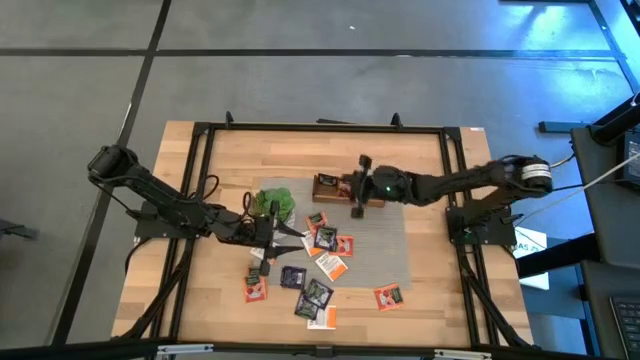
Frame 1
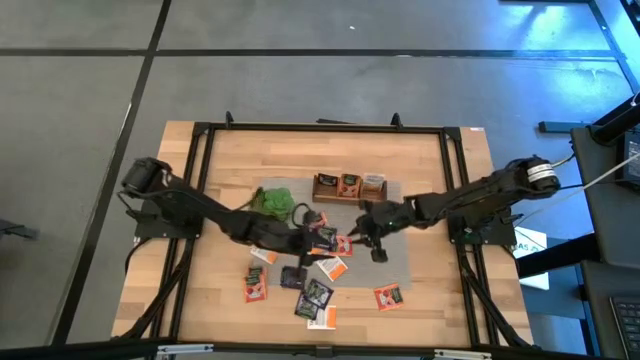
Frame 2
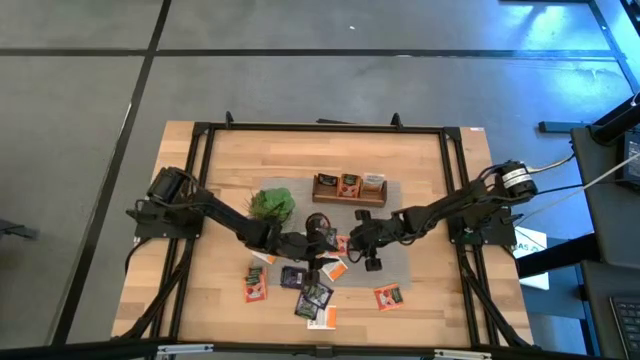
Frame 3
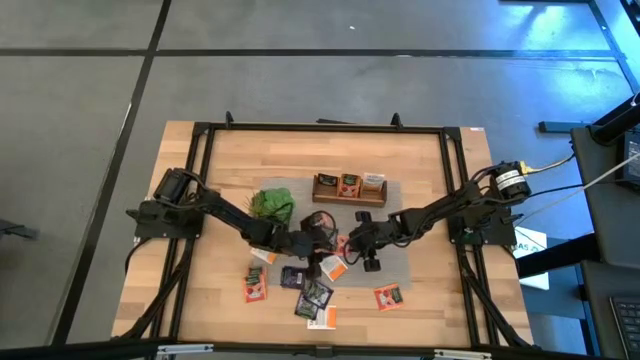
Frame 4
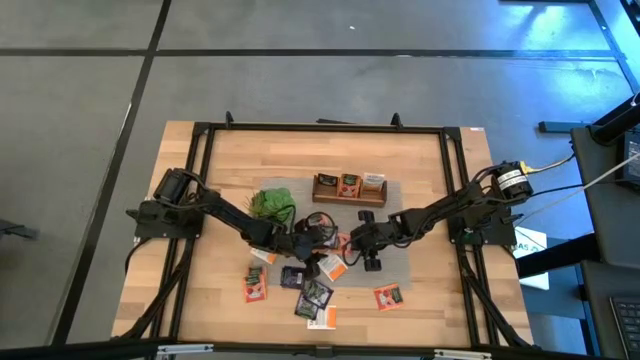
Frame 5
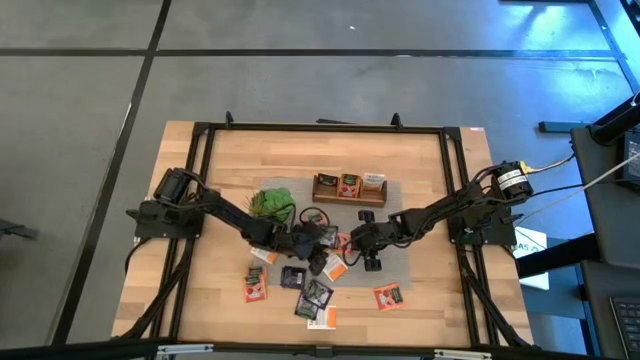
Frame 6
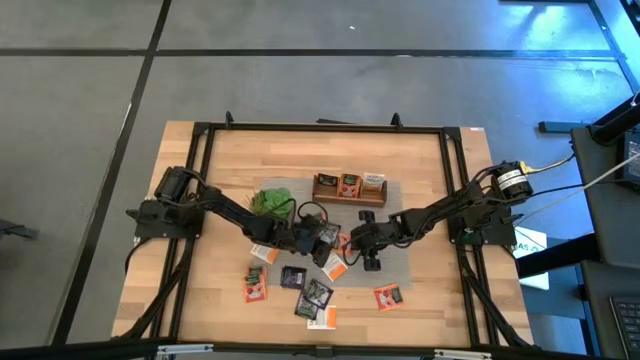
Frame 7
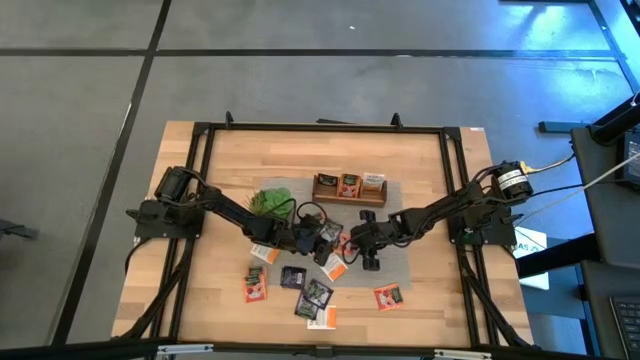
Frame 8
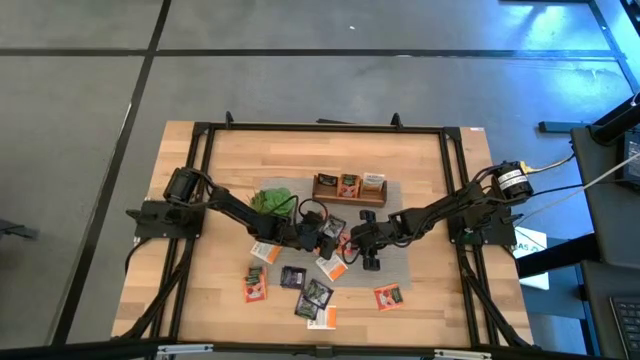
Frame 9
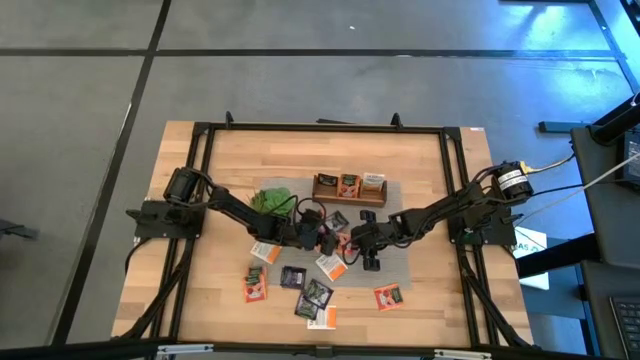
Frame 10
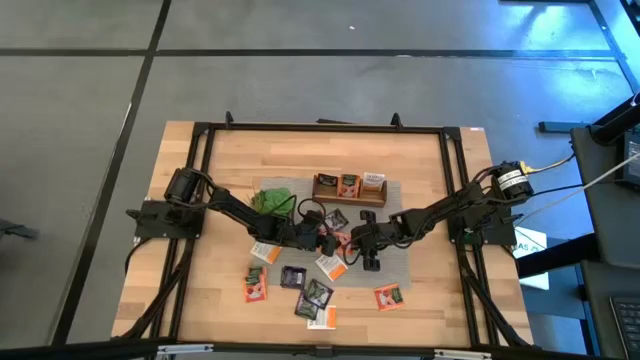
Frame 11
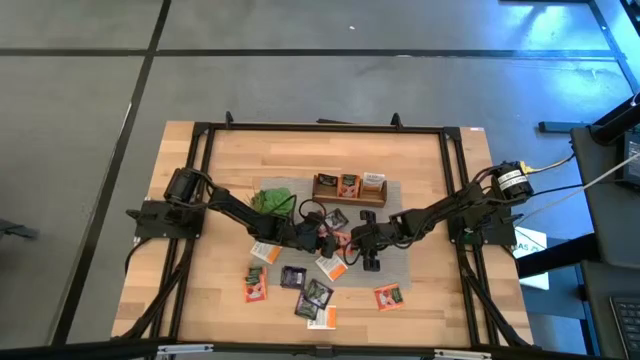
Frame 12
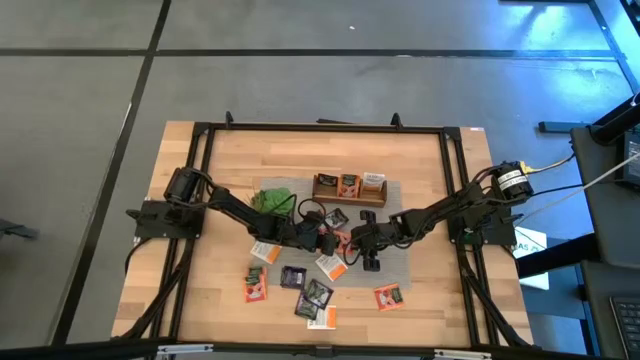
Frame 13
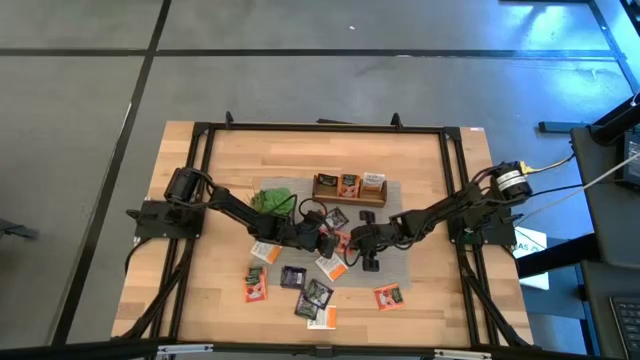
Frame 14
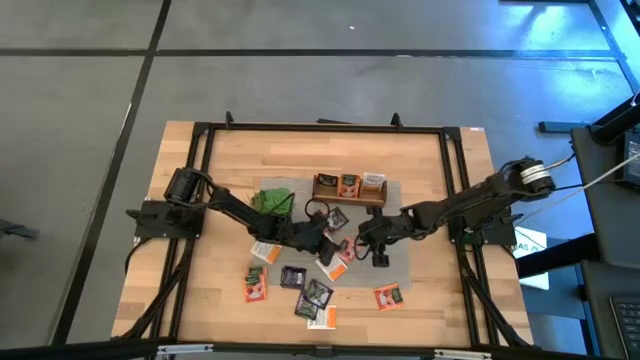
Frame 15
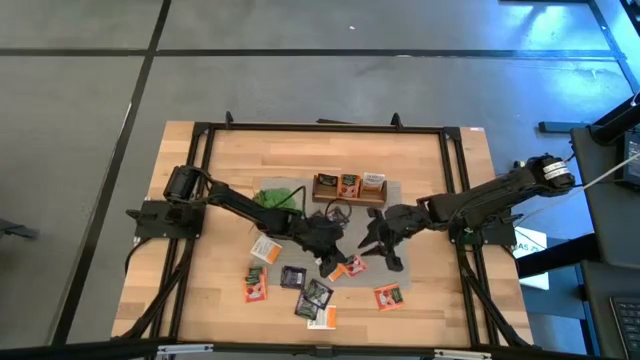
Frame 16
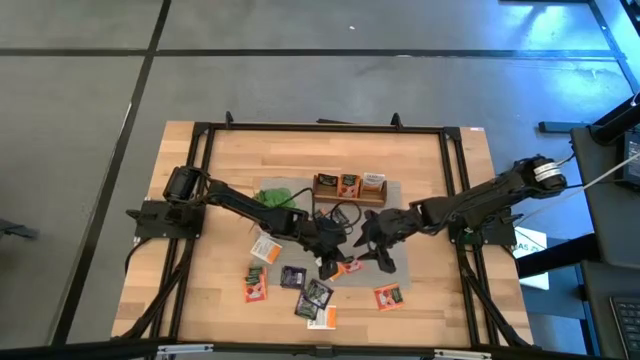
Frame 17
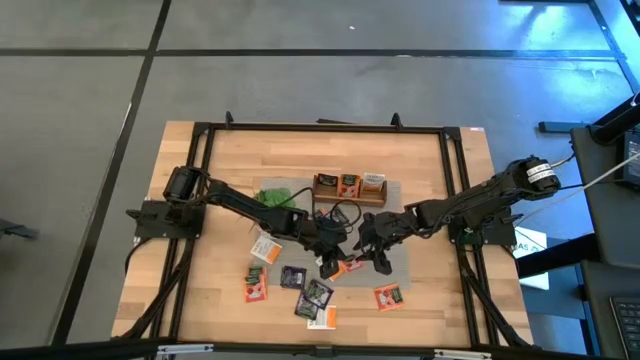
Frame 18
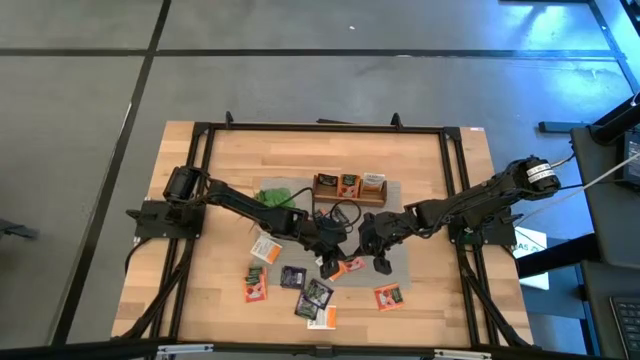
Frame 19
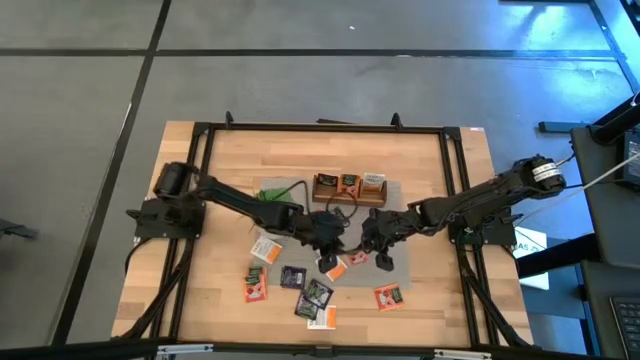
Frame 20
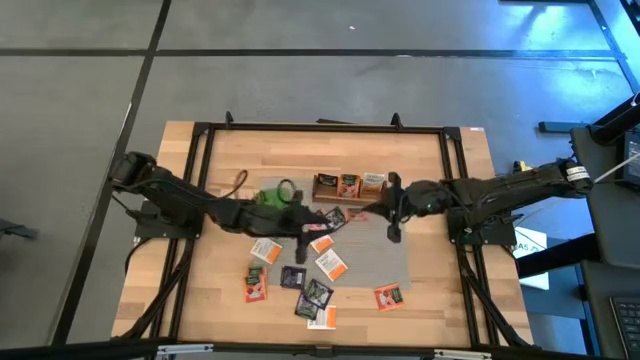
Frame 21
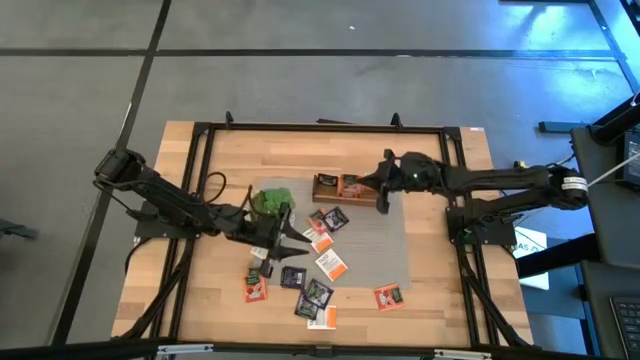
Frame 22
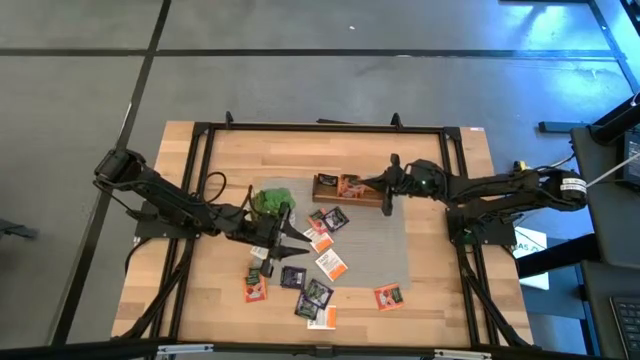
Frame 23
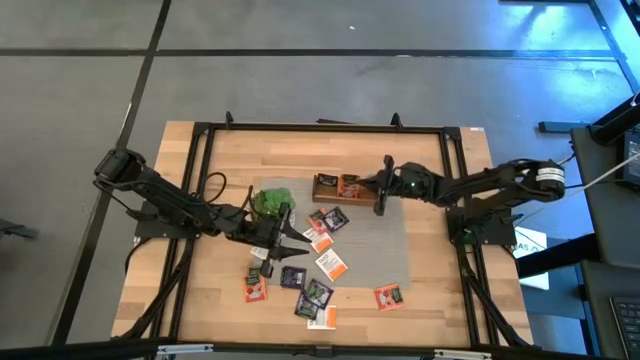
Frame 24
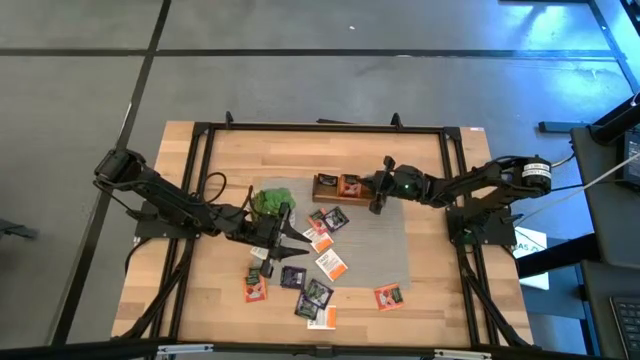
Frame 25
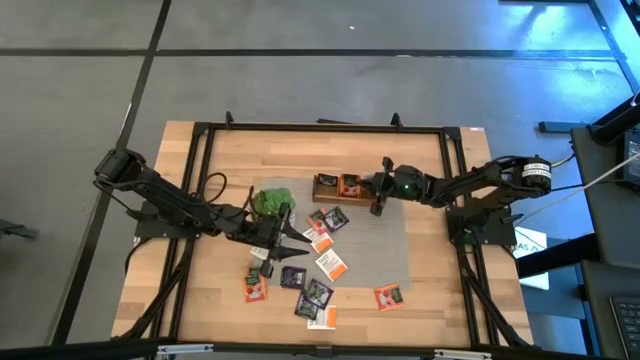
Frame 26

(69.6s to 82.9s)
Task: Pick & Place Tea
Put the orange tea bag into the middle section of the wooden organizer

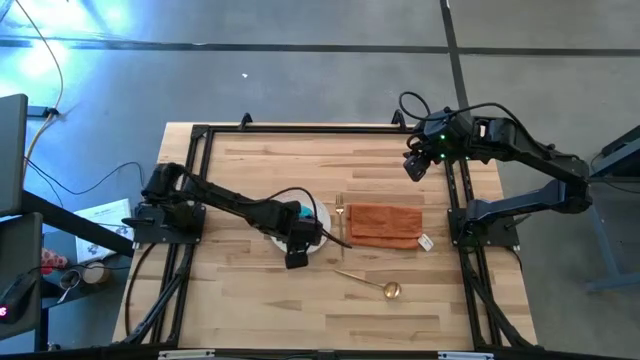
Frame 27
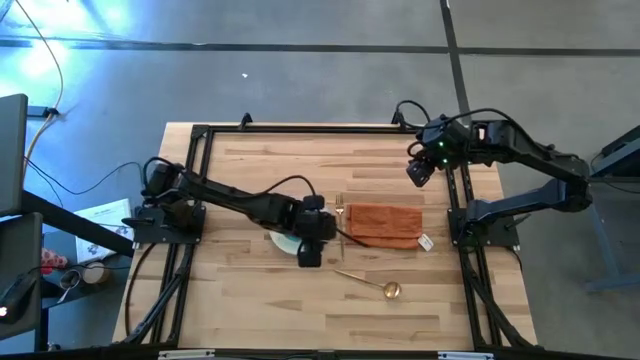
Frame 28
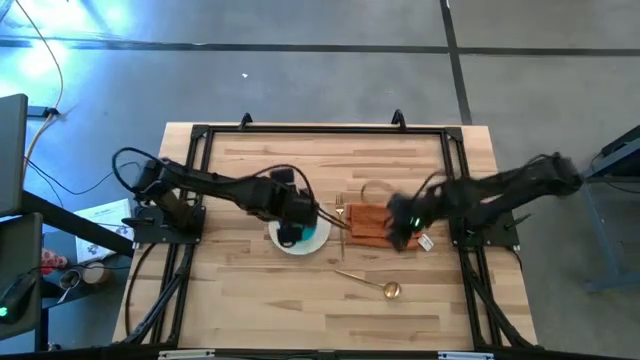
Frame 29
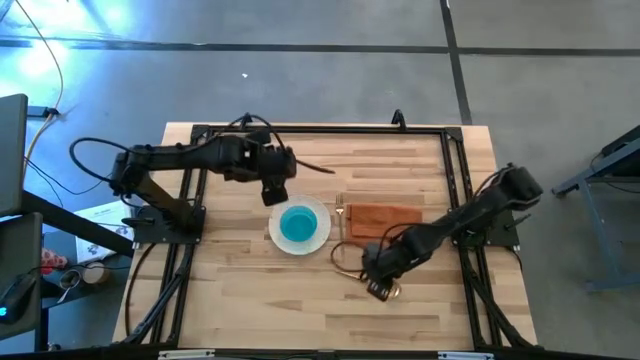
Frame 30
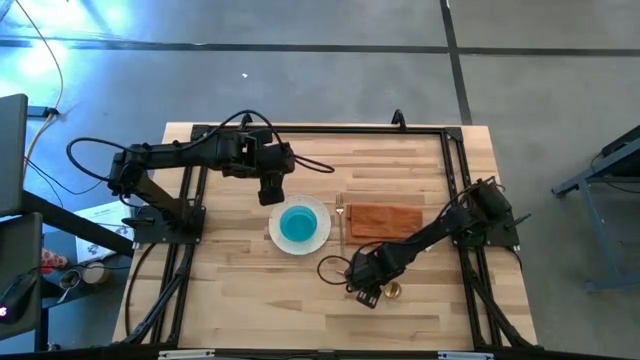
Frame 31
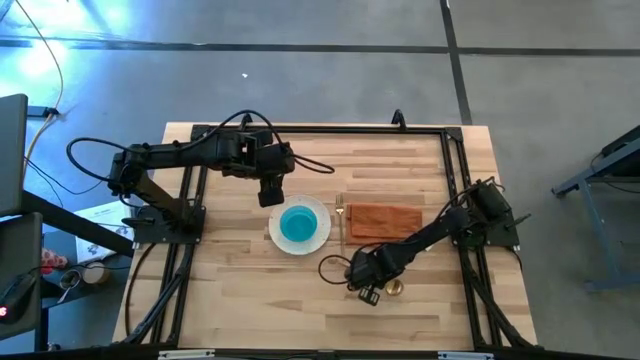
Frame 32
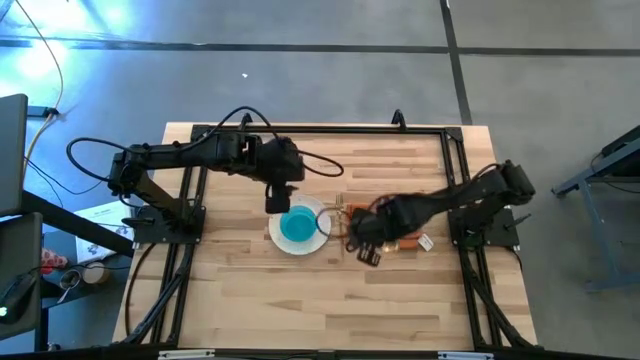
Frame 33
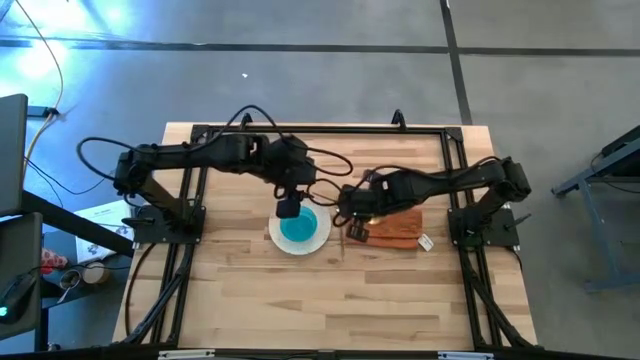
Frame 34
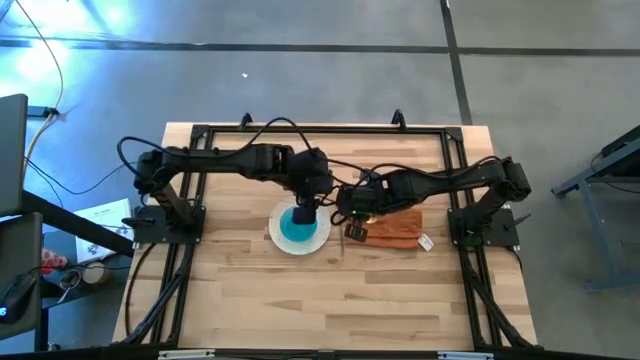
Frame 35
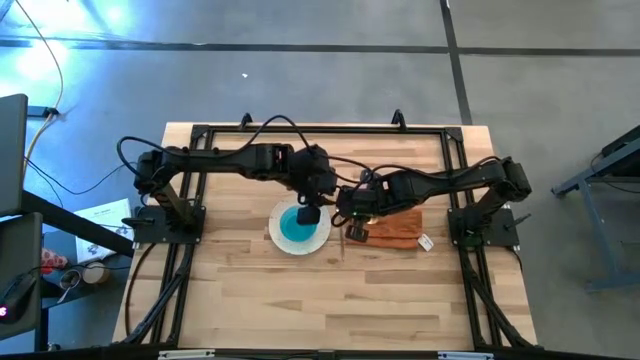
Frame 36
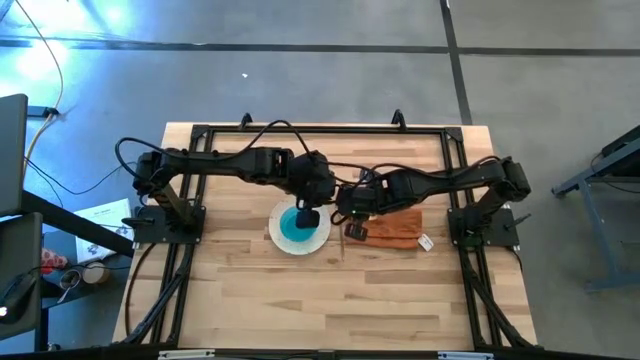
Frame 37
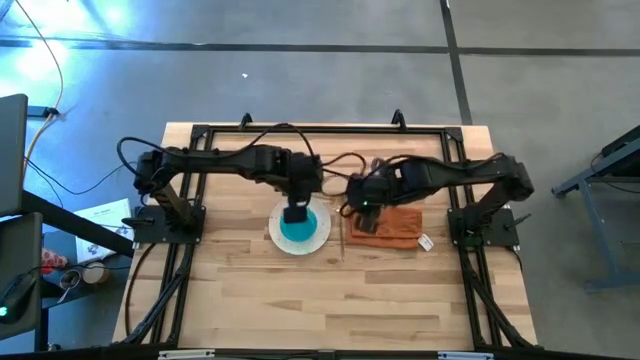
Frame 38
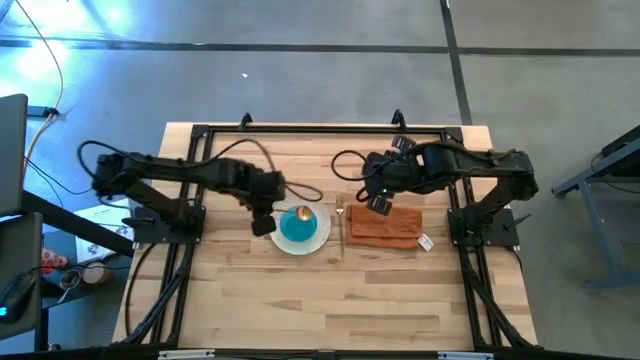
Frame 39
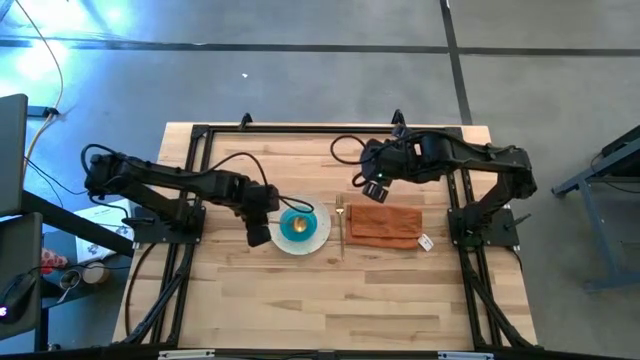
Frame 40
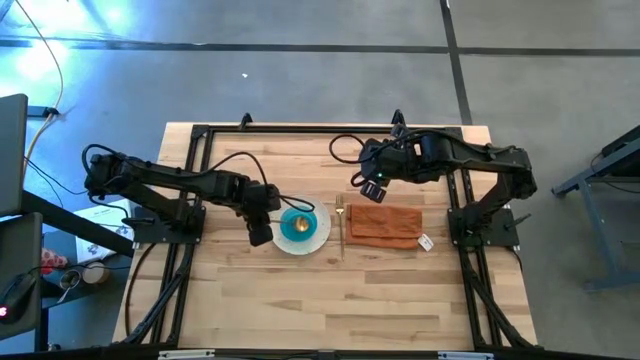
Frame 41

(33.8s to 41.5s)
Task: Set table place
Put the gold spoon into the blue bowl

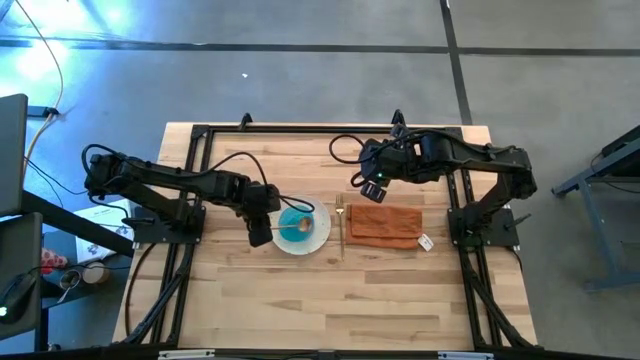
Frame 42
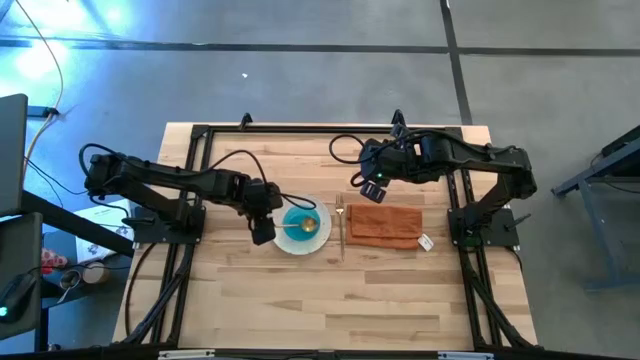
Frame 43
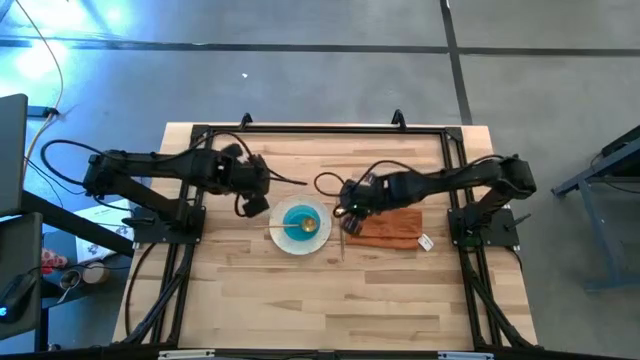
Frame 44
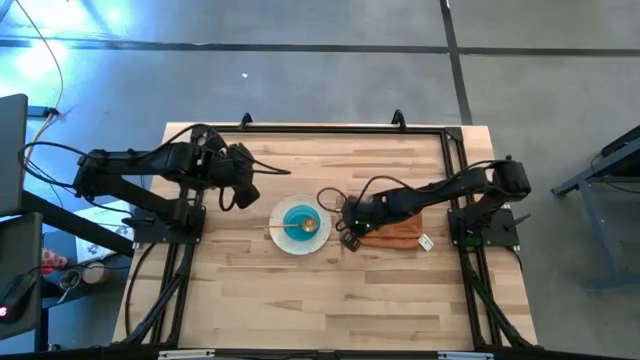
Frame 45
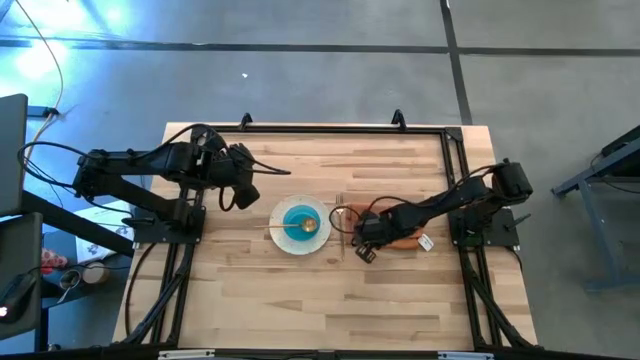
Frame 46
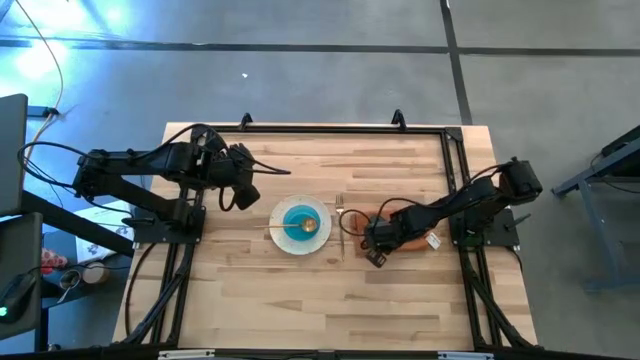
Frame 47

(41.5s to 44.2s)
Adjust the orange table napkin on the table
